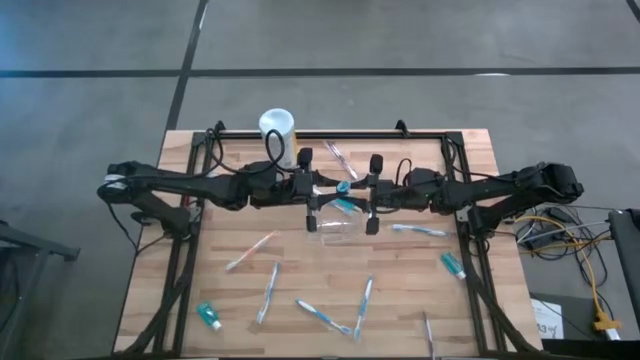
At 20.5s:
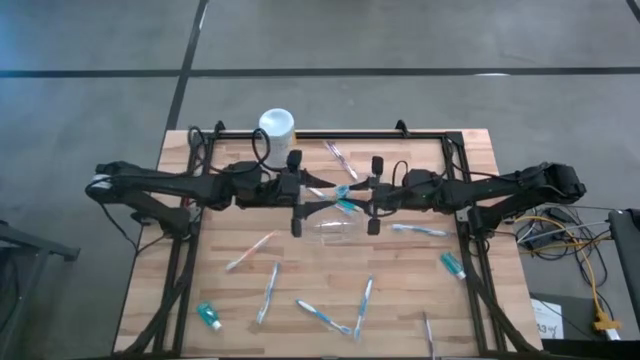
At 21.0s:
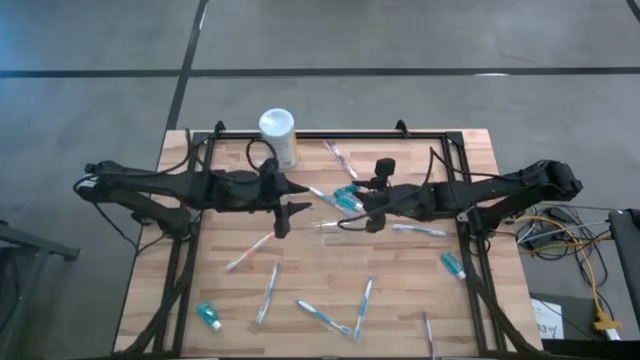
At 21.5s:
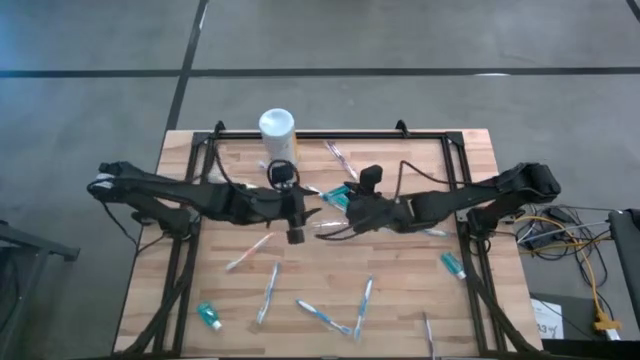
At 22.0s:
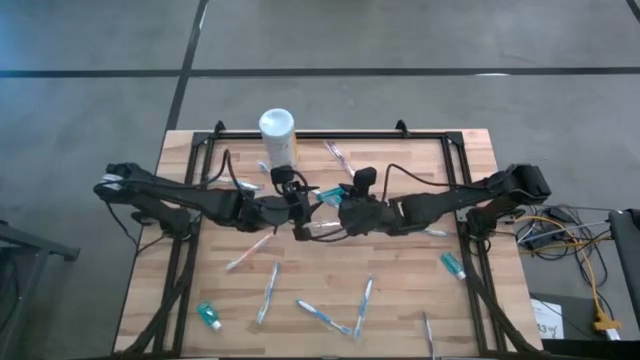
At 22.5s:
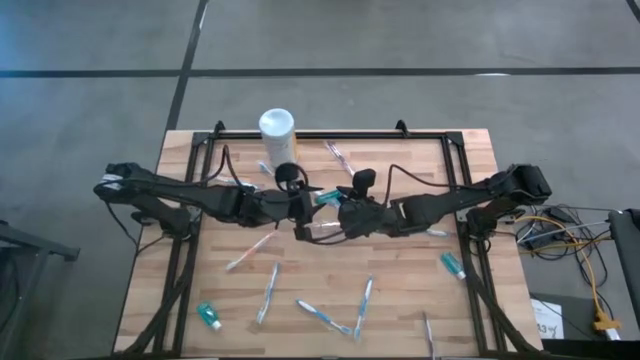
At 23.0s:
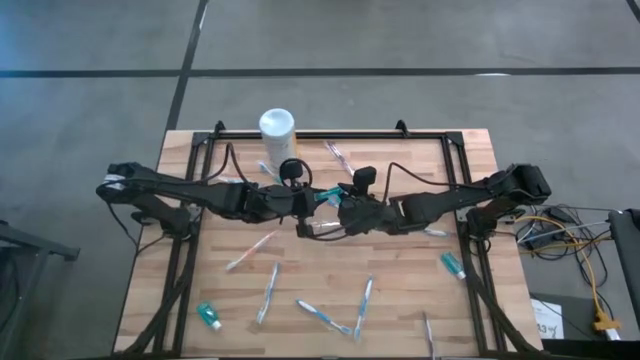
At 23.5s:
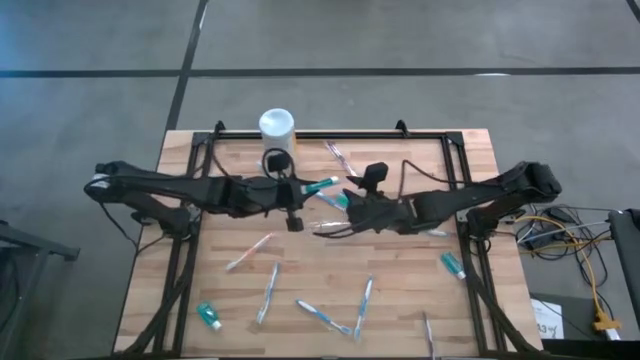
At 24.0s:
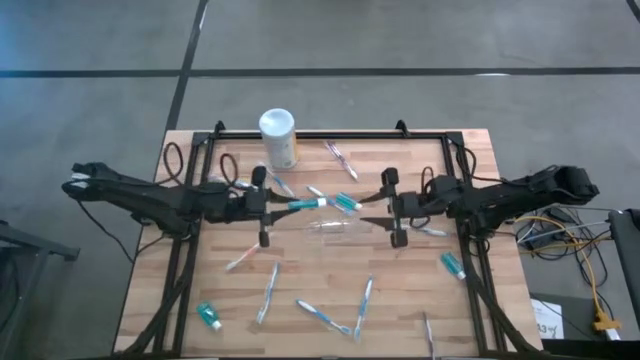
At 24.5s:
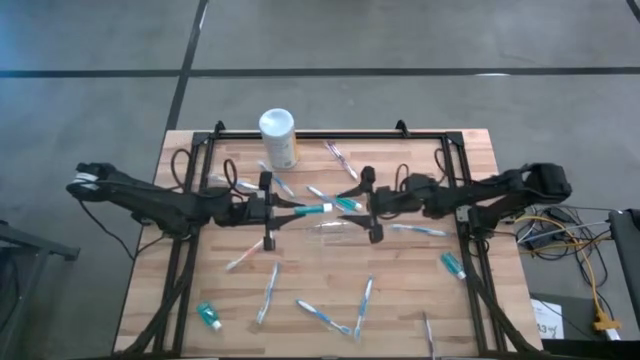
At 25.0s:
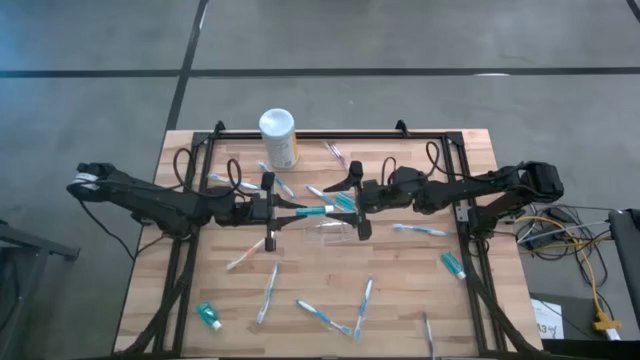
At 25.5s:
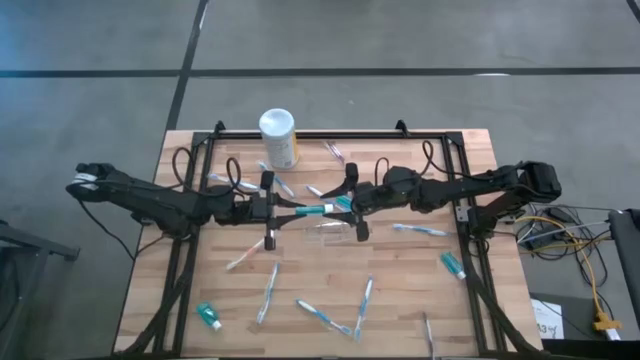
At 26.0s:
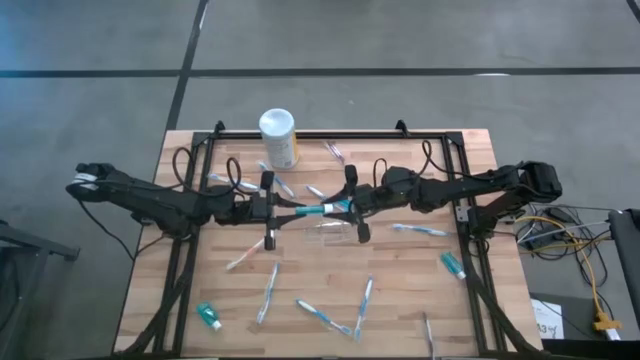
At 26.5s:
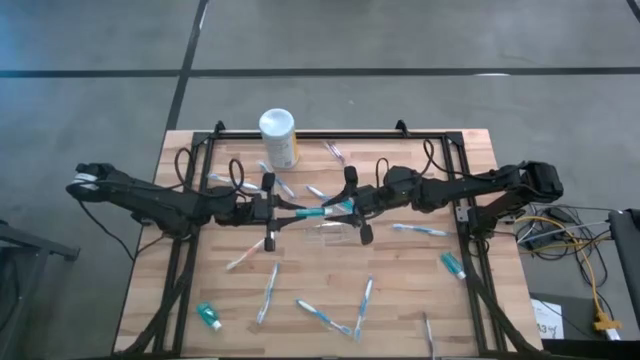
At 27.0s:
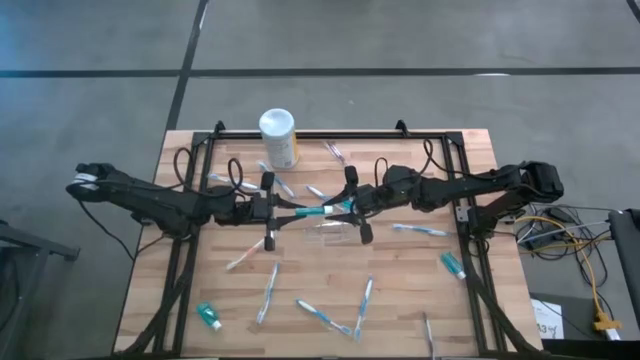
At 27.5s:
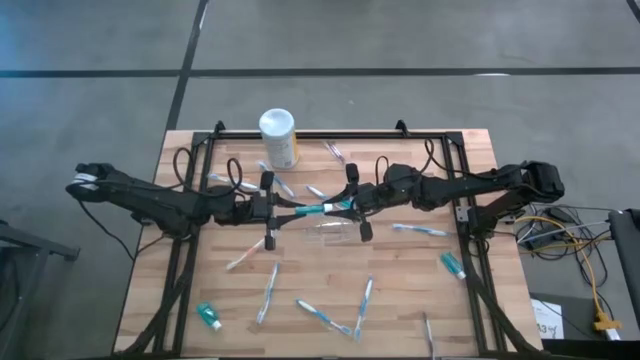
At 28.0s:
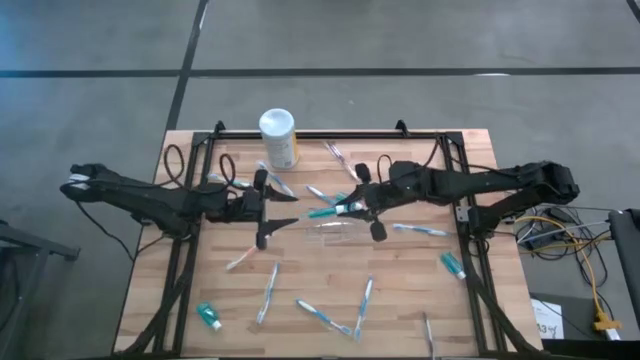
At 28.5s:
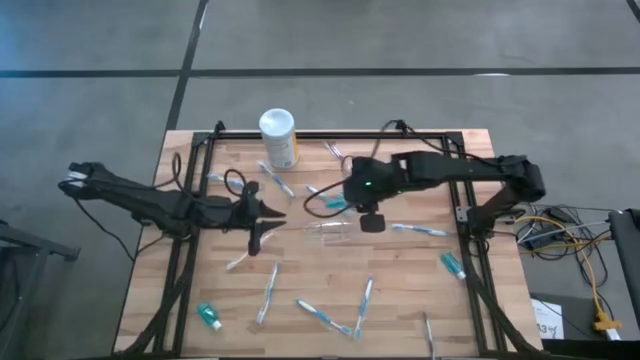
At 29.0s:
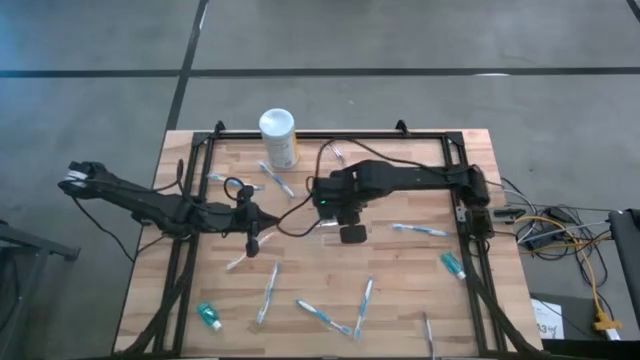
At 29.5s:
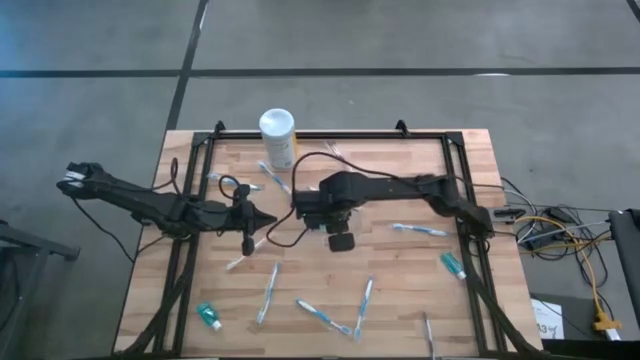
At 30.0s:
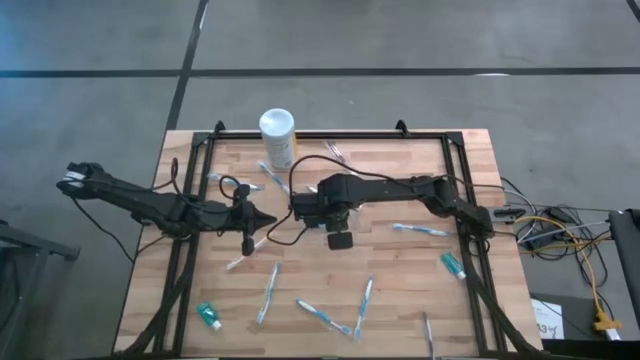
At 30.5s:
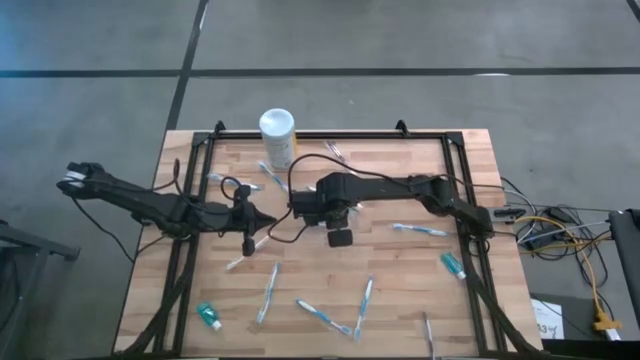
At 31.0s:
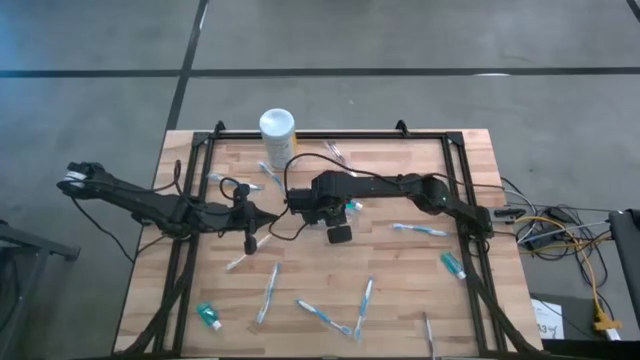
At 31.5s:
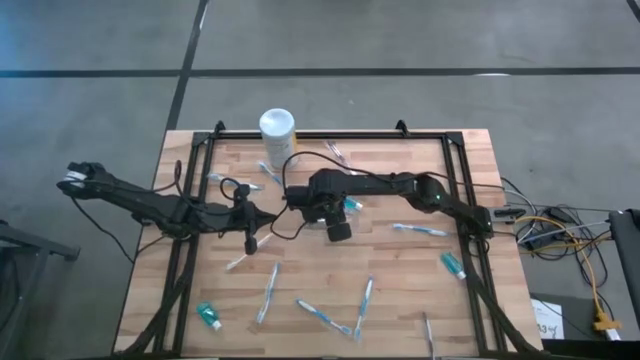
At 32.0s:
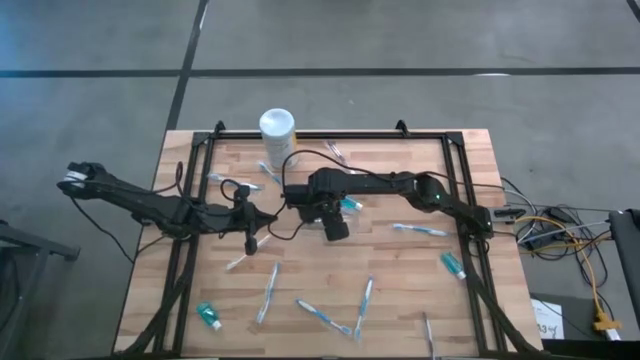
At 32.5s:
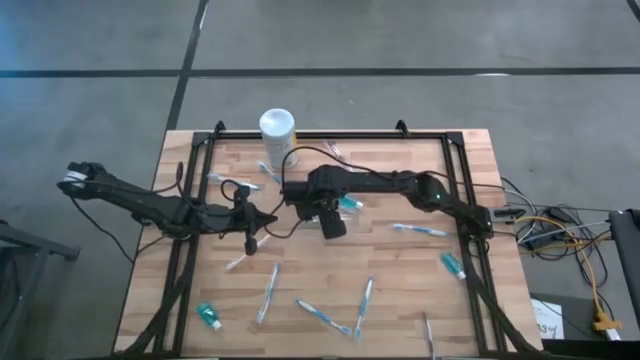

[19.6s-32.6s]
Task: Pick & Place toothbrushing station
Put the blue mouthwash into the transparent organizer

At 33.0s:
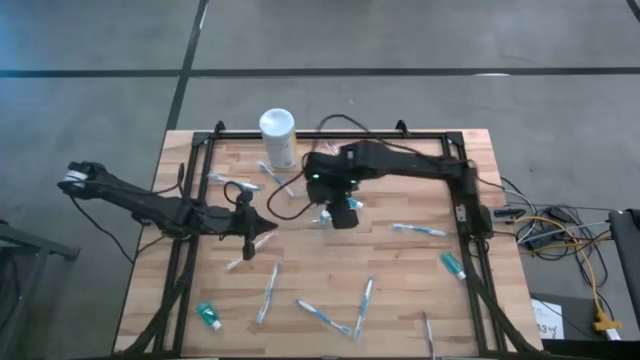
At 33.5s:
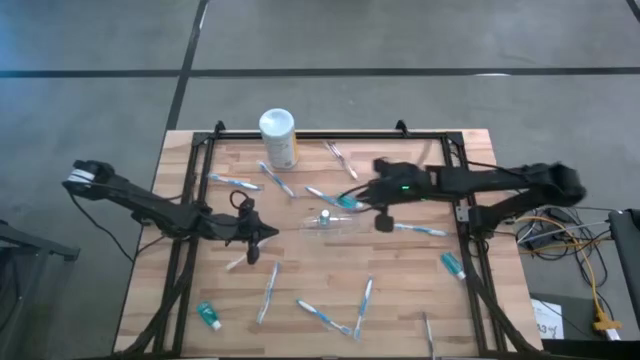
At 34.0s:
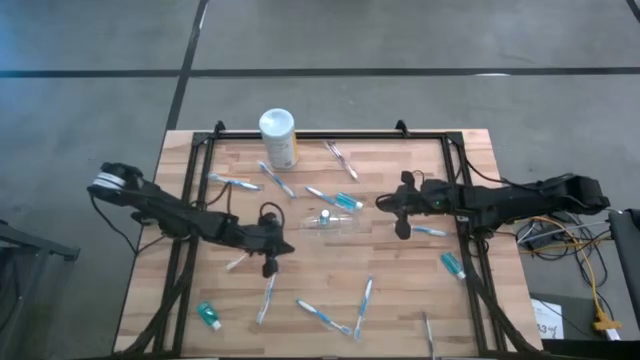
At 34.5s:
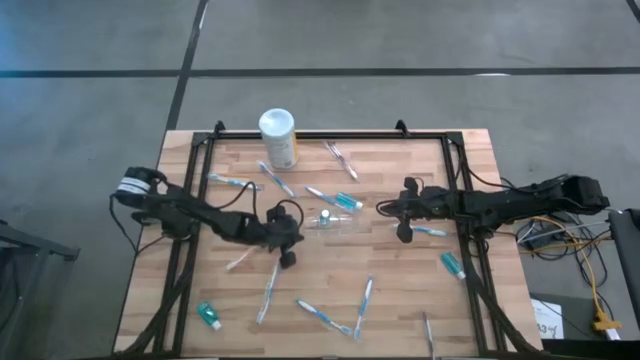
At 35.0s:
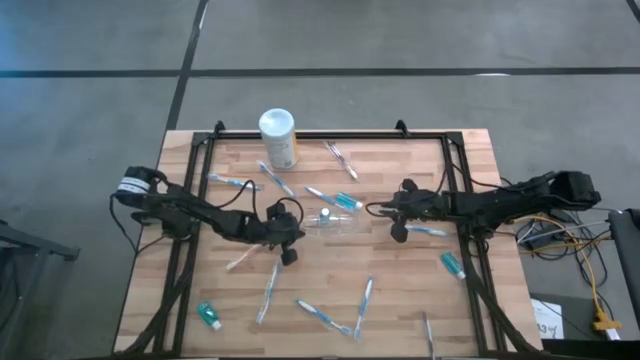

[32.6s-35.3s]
Adjust the transparent organizer

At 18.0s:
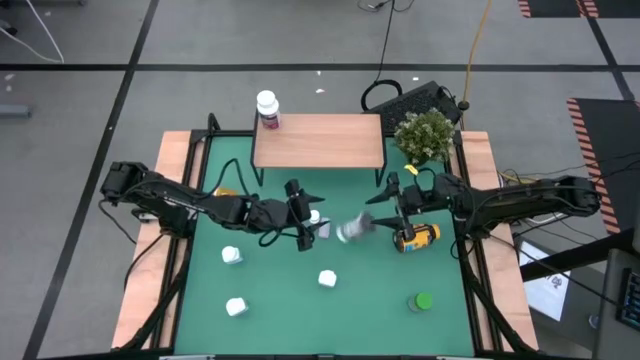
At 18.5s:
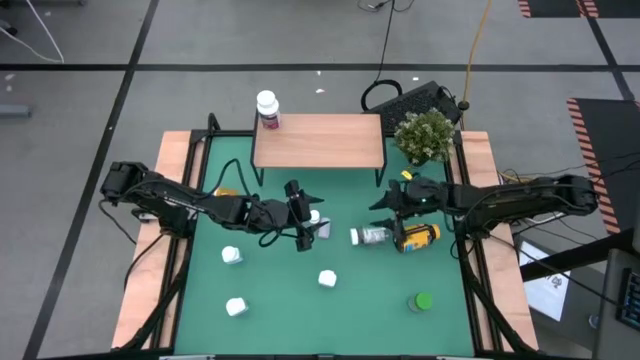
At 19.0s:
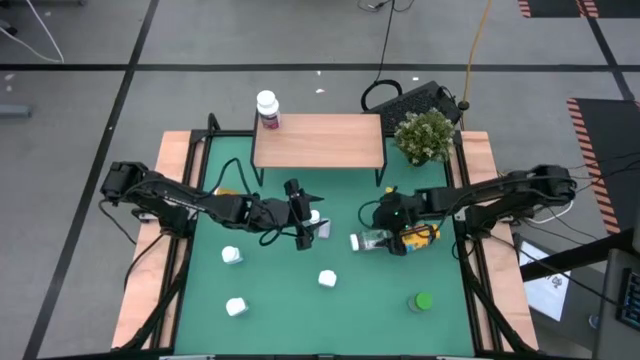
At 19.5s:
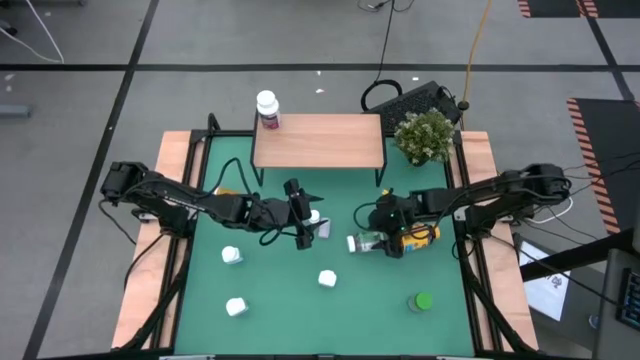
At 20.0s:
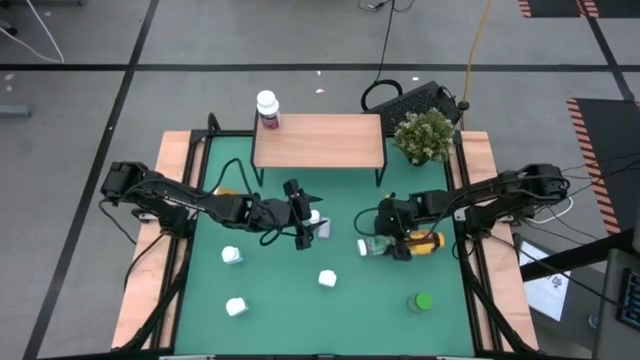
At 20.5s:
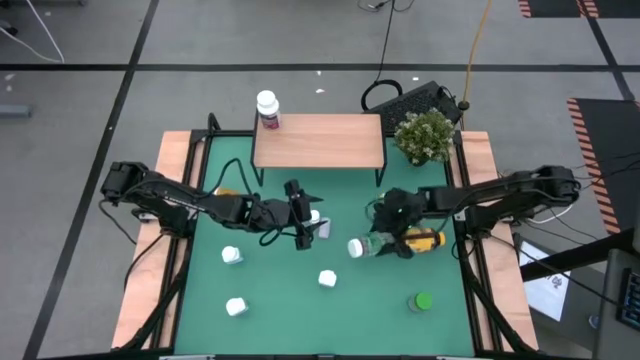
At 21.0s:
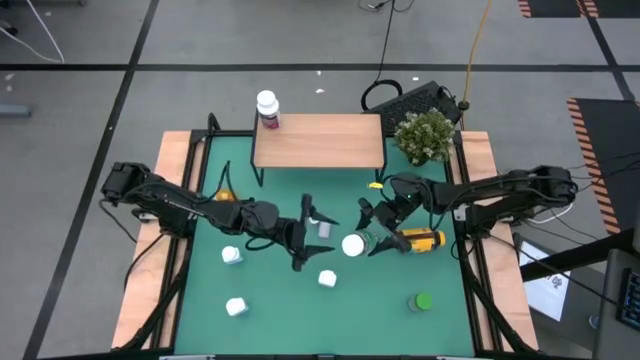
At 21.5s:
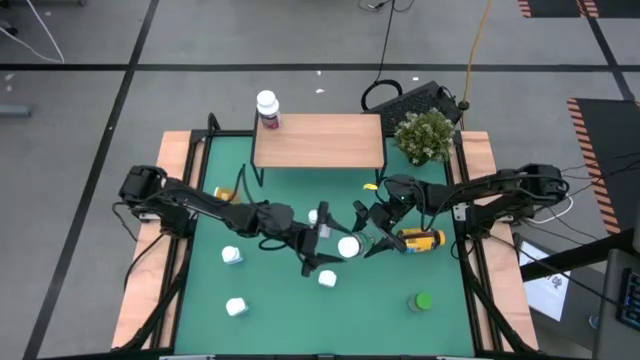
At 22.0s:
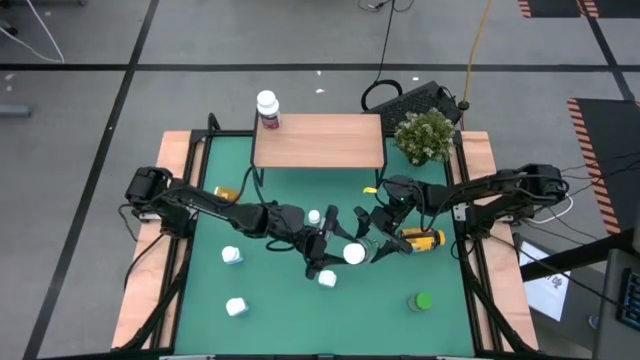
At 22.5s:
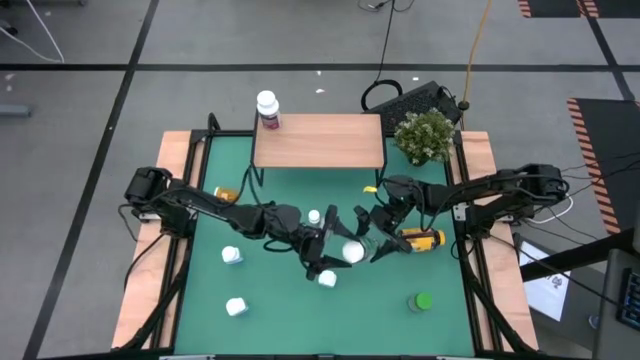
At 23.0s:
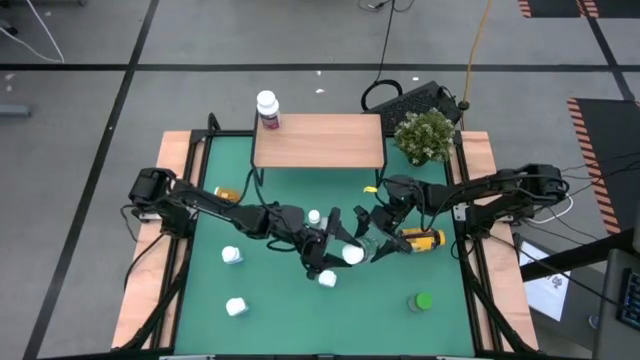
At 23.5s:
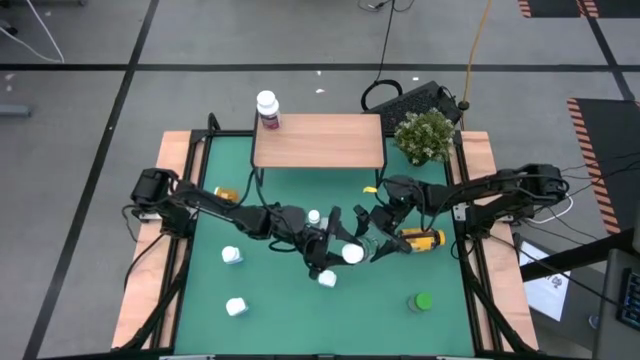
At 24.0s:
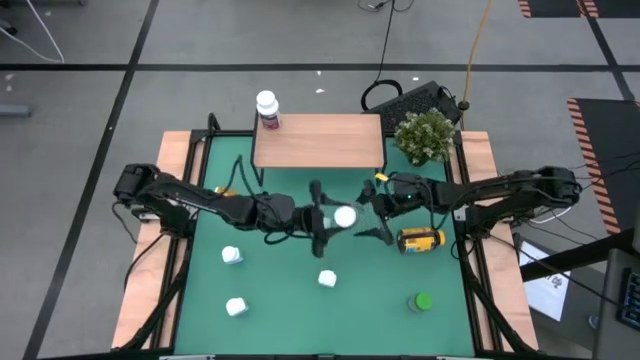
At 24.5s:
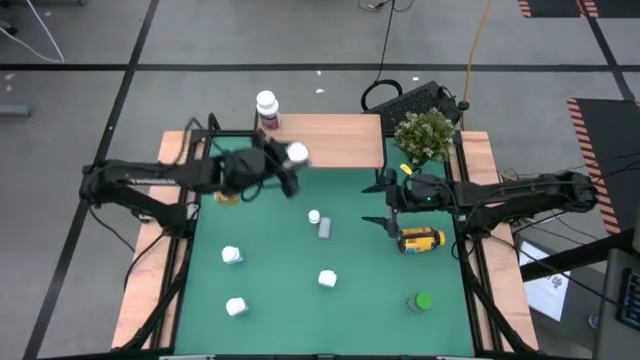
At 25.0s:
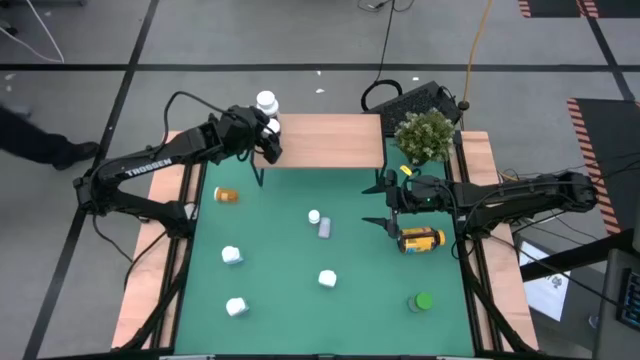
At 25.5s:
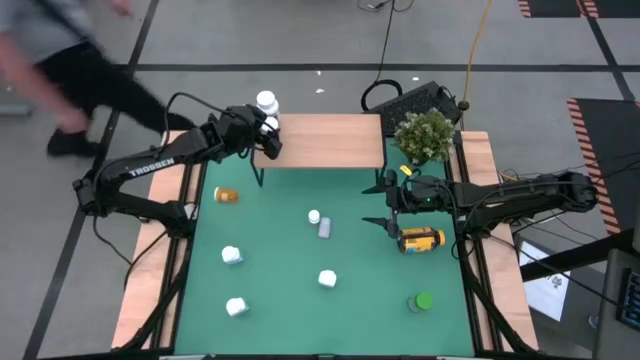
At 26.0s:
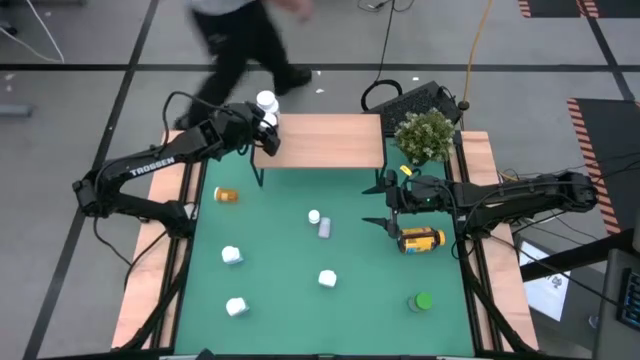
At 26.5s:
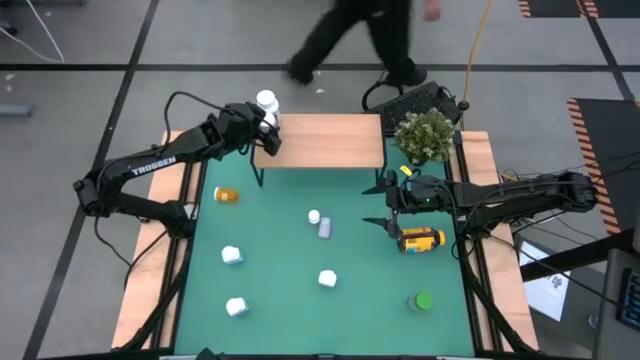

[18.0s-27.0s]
Task: Pick and place medicine bottles onto shelf by color
Put the white and green pill bottle on the shelf
